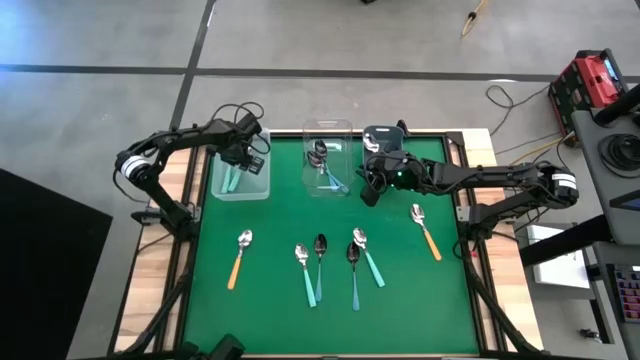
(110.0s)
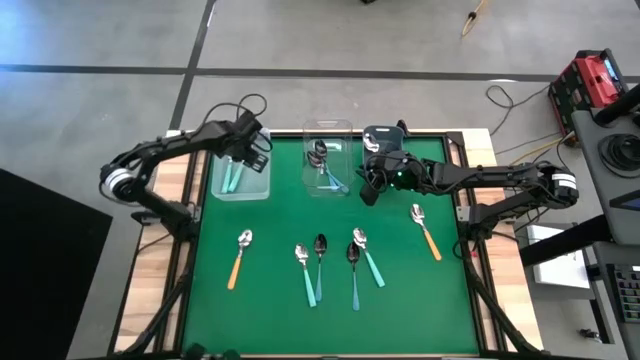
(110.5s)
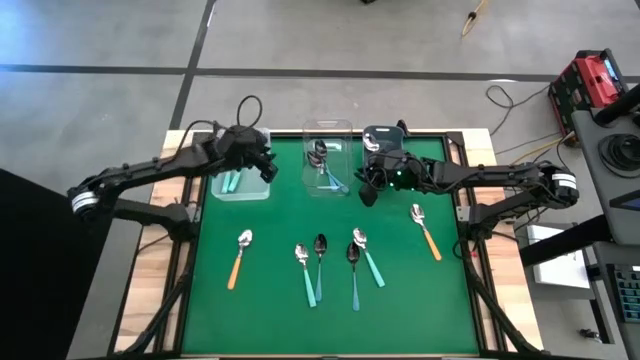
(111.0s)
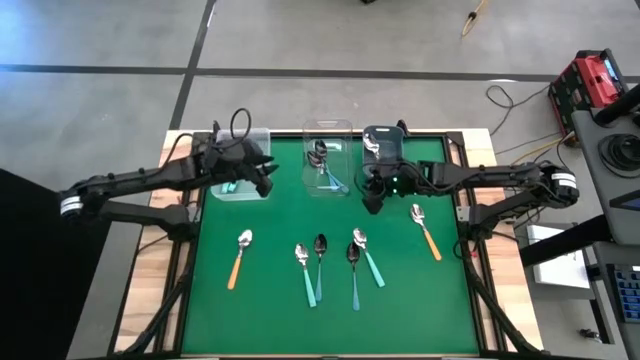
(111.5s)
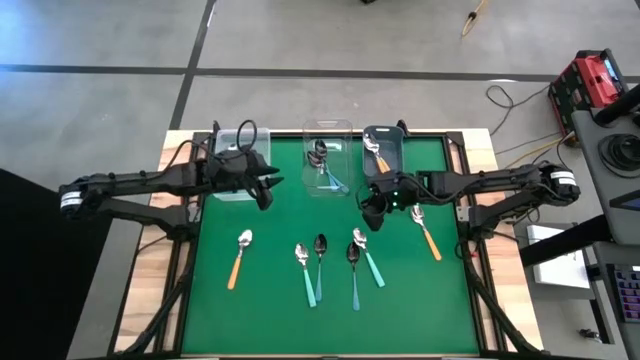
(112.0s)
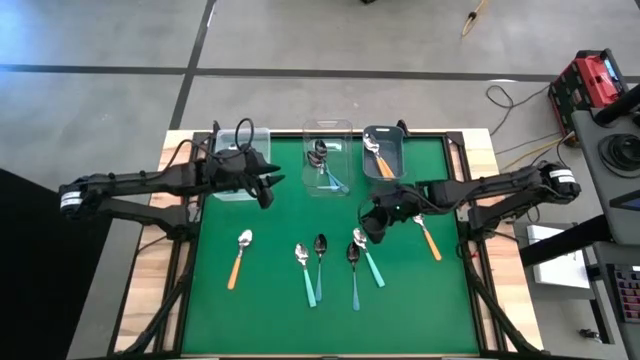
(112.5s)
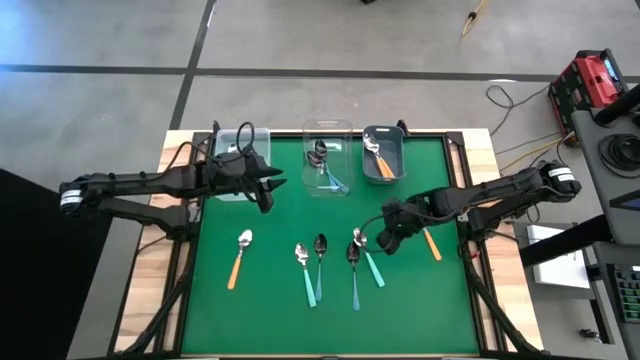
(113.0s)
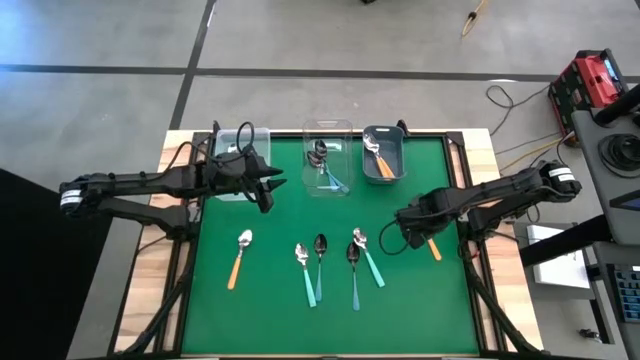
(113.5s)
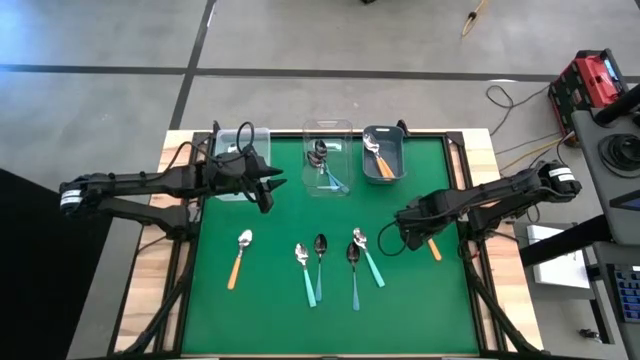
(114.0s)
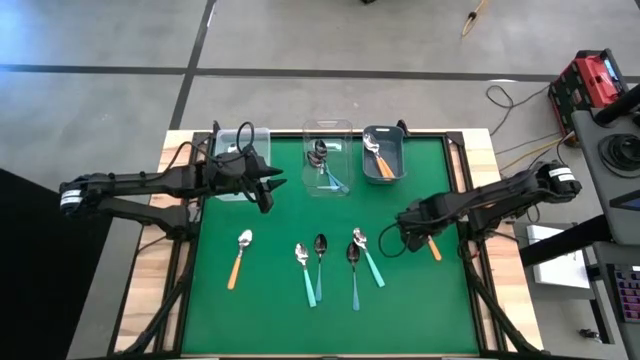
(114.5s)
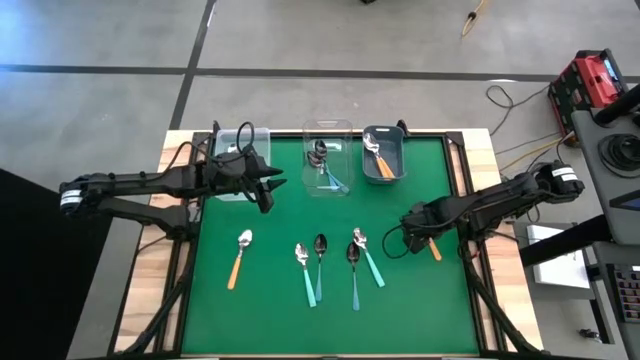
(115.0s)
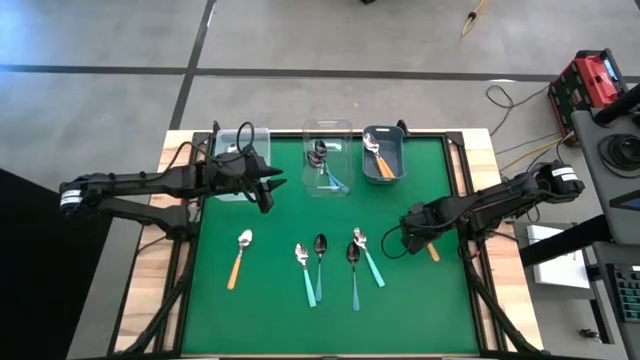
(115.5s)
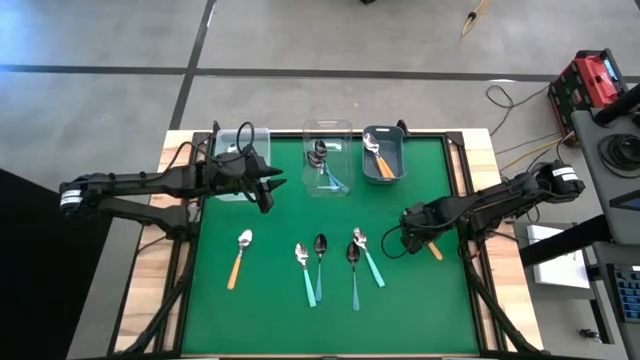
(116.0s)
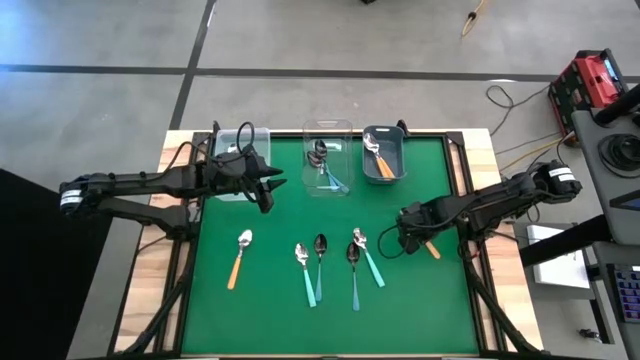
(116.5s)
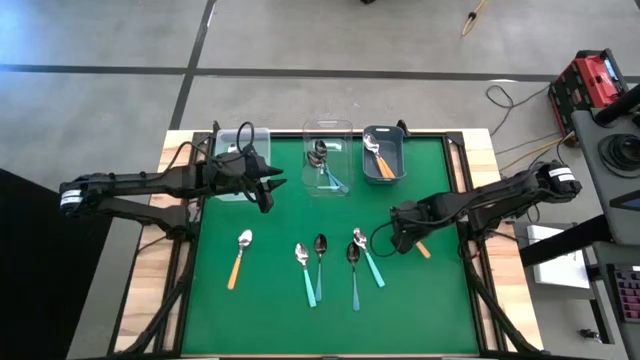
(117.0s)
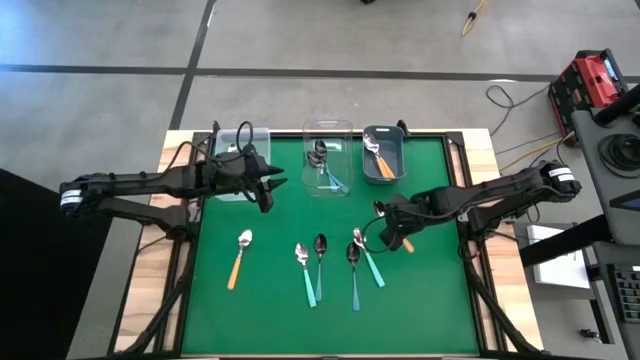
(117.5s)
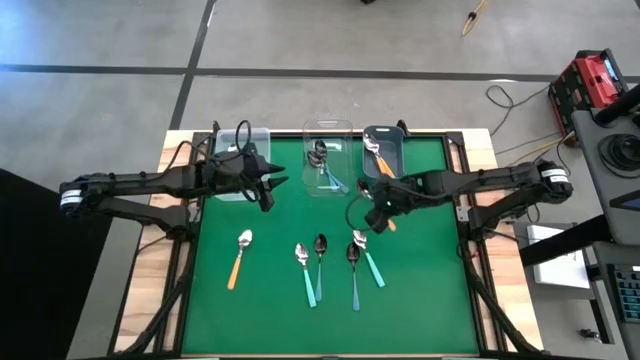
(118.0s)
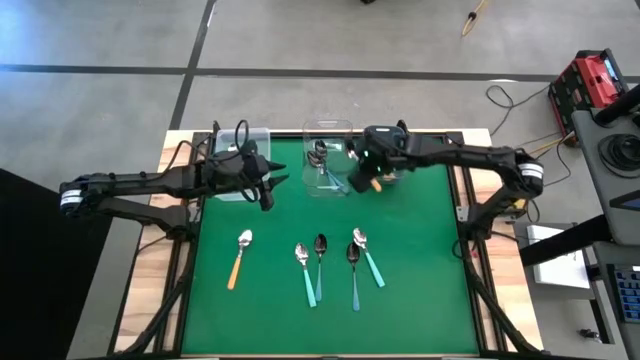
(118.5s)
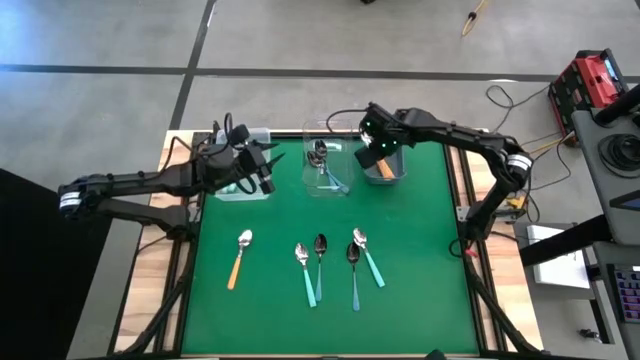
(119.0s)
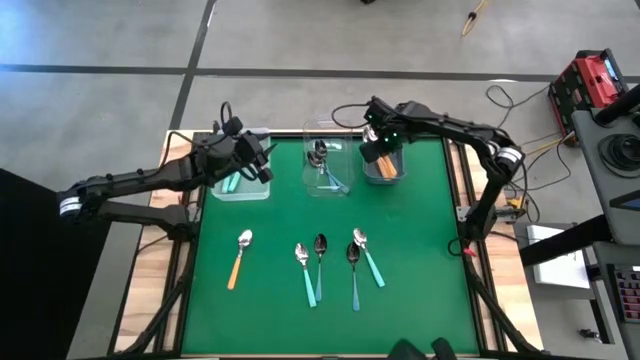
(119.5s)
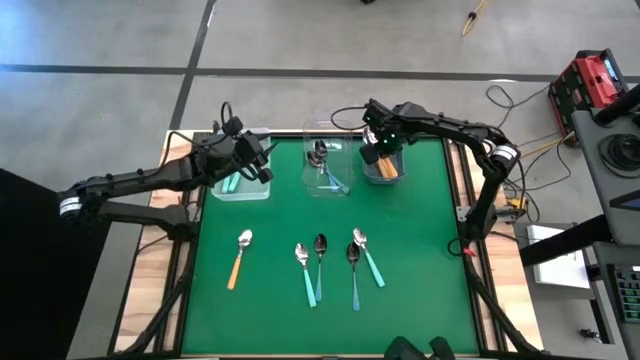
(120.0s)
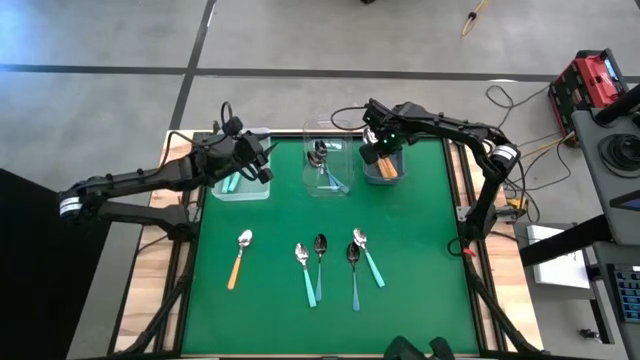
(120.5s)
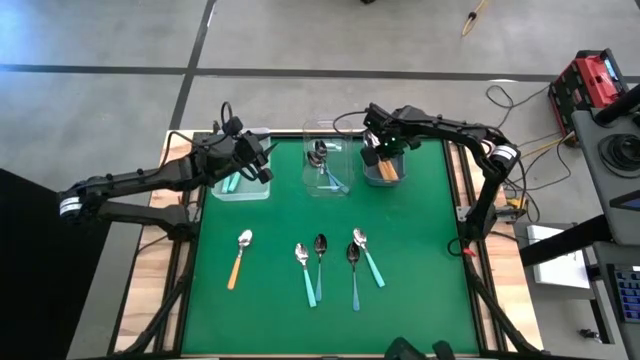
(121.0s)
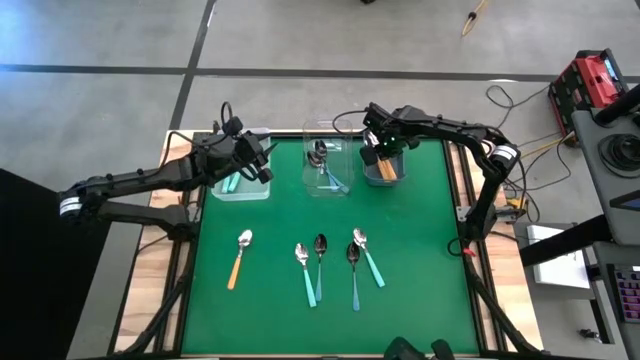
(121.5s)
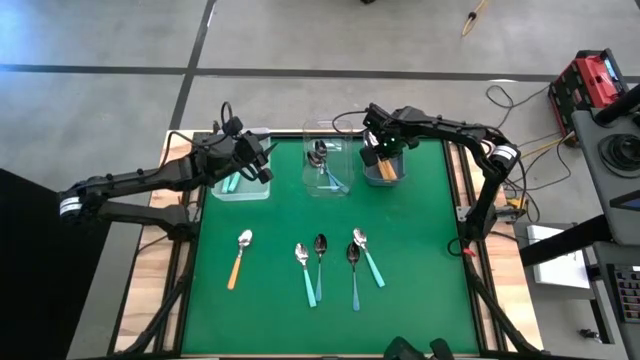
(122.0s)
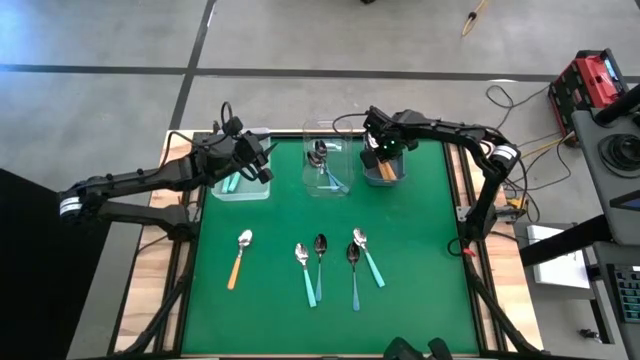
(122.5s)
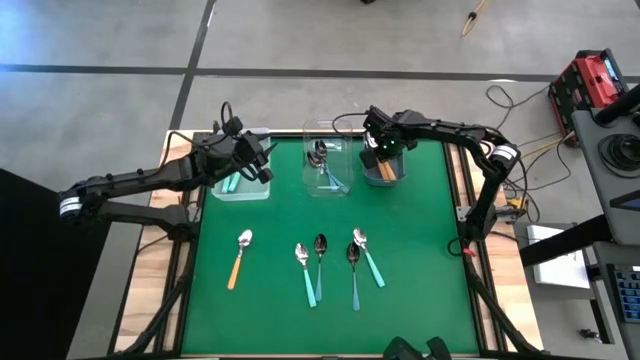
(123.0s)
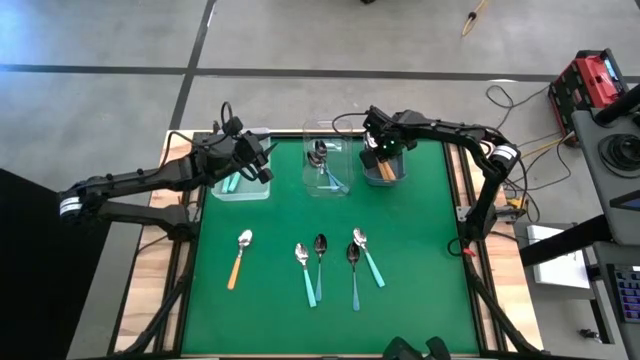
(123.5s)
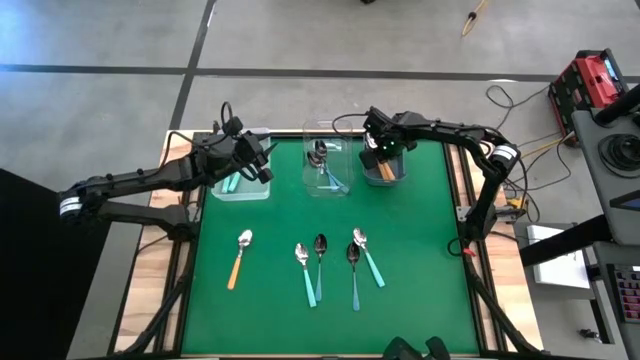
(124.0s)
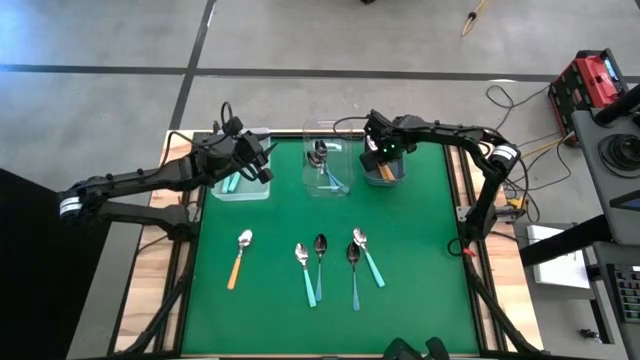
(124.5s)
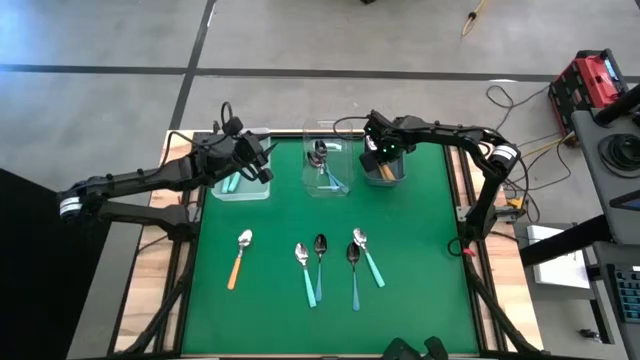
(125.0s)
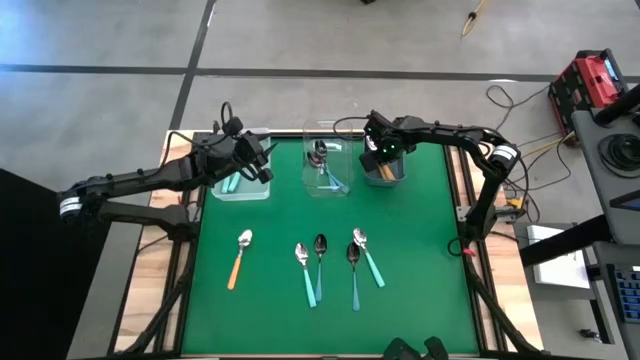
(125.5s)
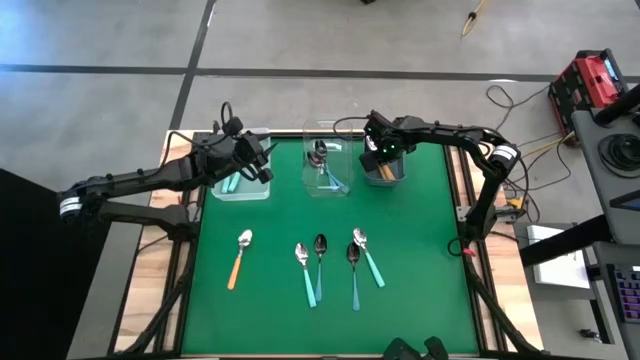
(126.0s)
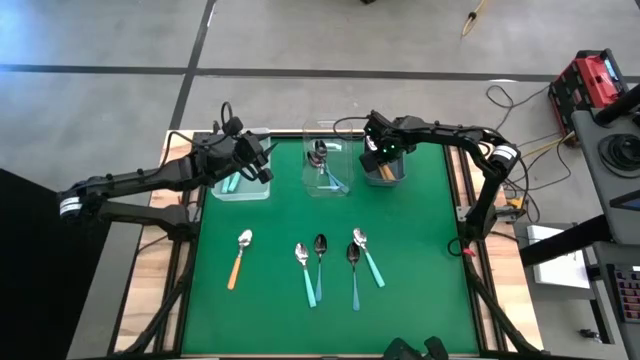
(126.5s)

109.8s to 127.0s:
Task: Sort silverware by color (type)
Put the yellow spoon into the blue bin

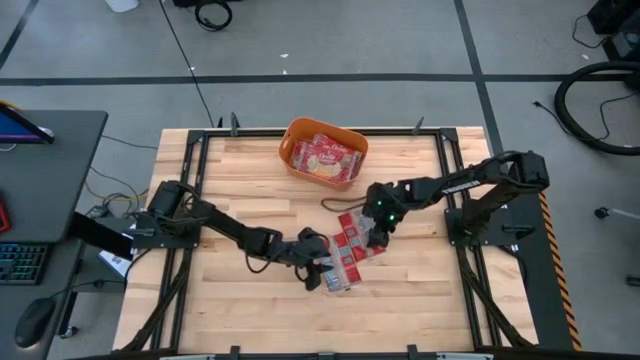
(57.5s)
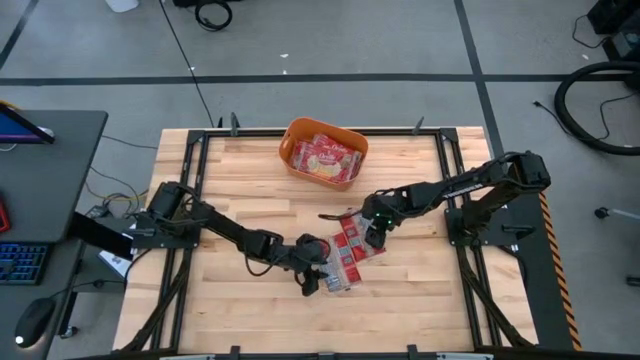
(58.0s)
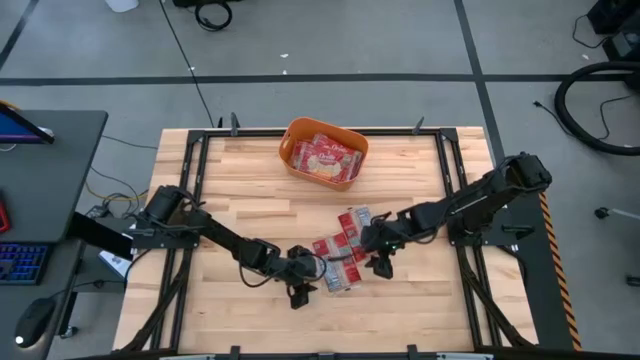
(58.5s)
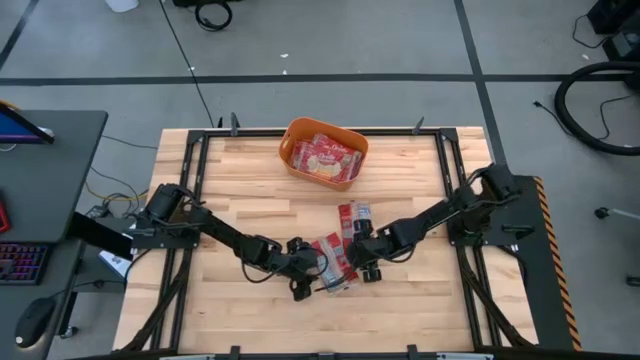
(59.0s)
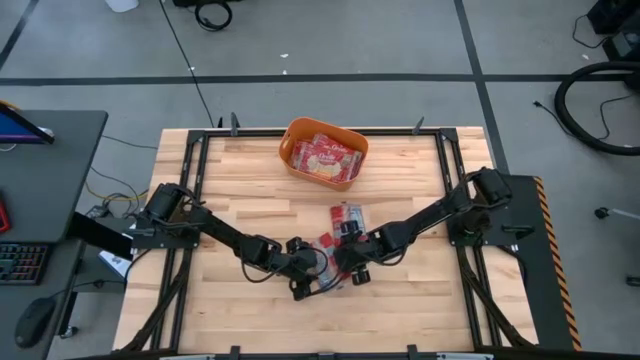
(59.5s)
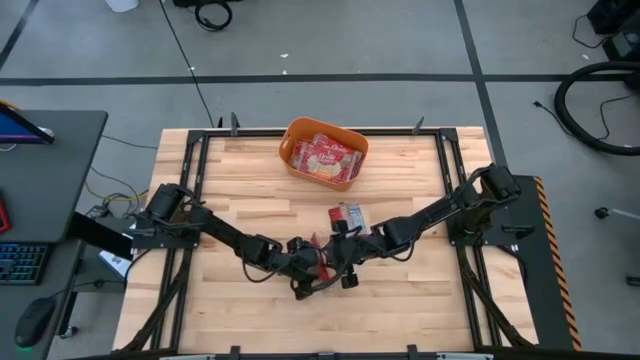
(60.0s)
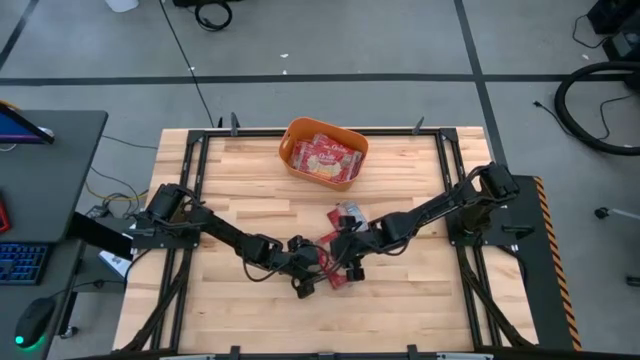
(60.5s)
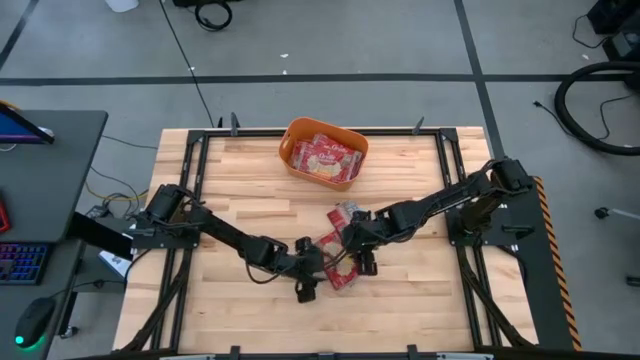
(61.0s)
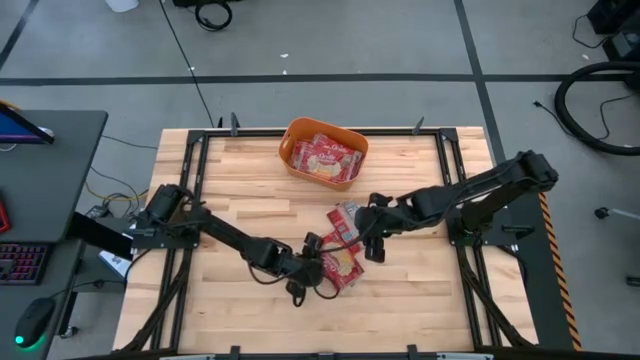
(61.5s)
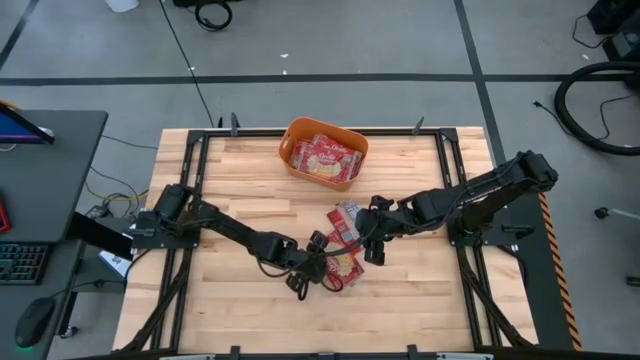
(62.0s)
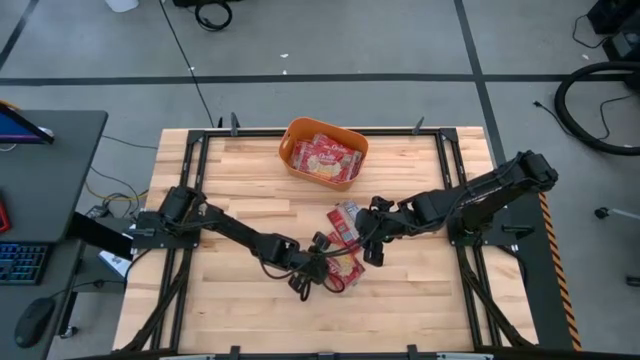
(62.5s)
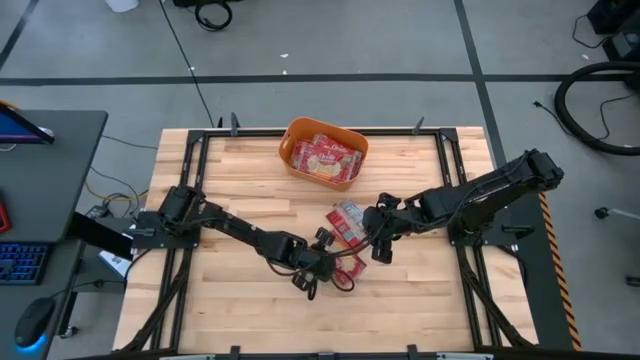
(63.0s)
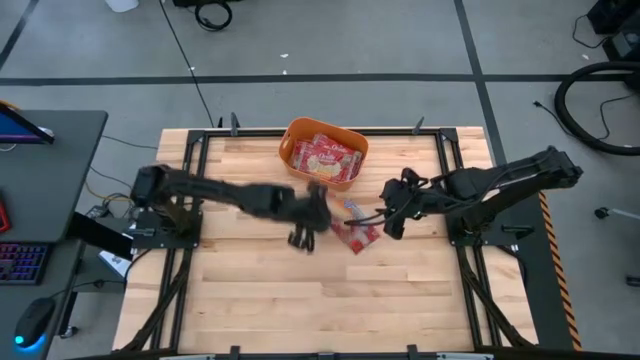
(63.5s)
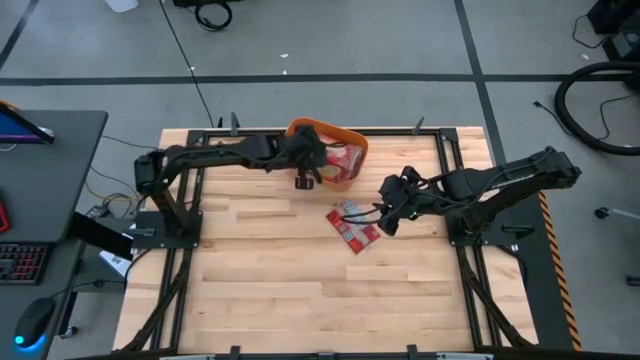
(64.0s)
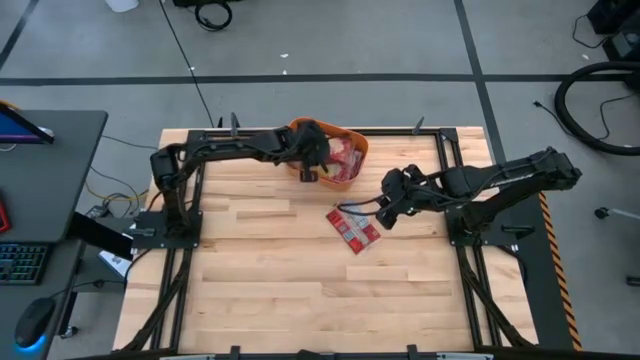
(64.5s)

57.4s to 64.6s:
Task: Sort popcorn bags into baskets
Put the red popcorn bag into the orange bin
